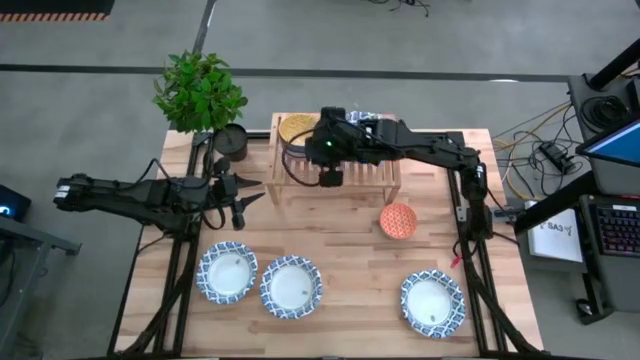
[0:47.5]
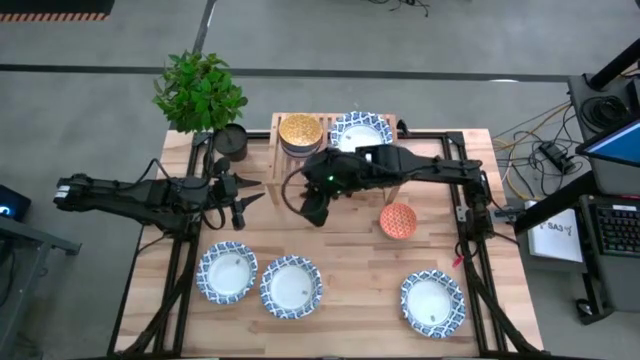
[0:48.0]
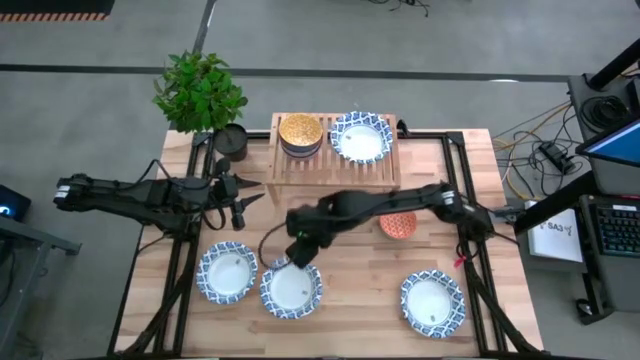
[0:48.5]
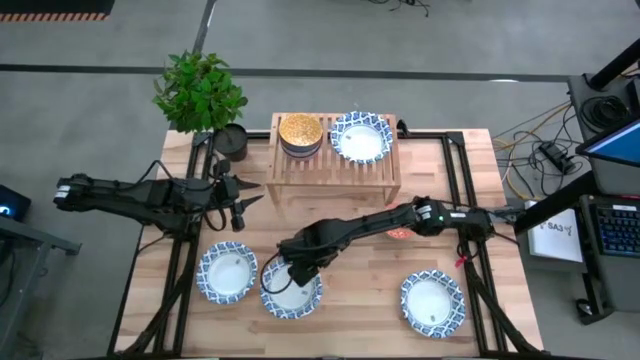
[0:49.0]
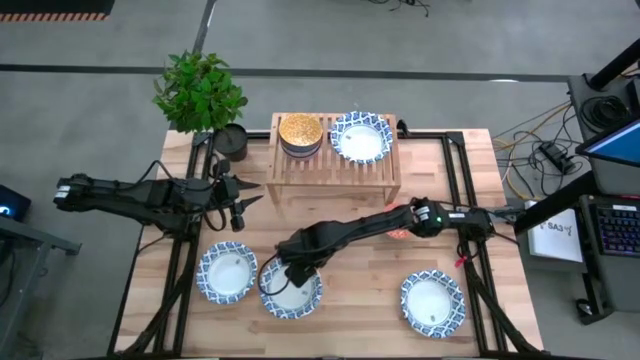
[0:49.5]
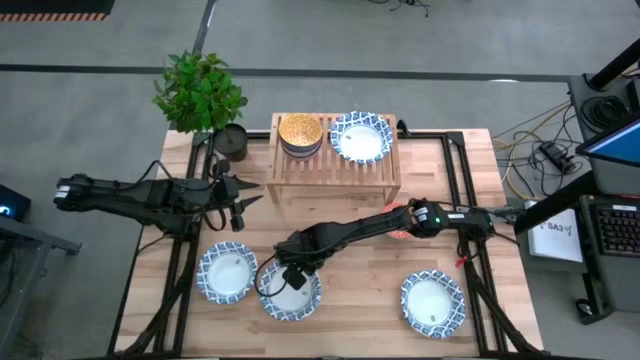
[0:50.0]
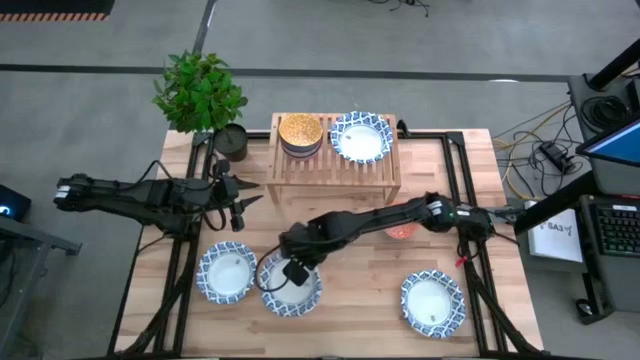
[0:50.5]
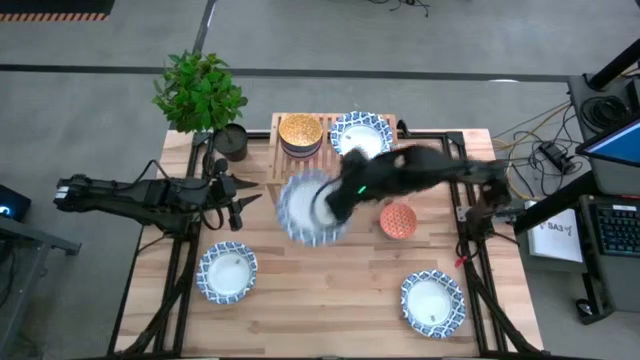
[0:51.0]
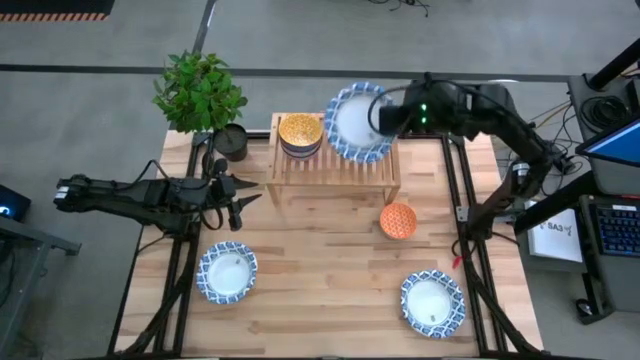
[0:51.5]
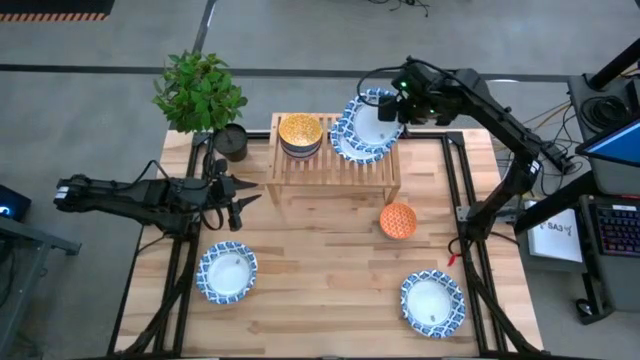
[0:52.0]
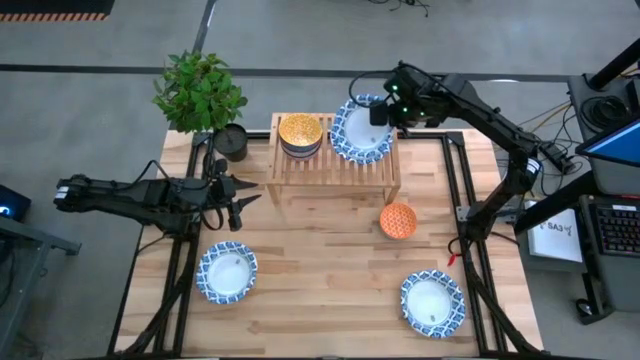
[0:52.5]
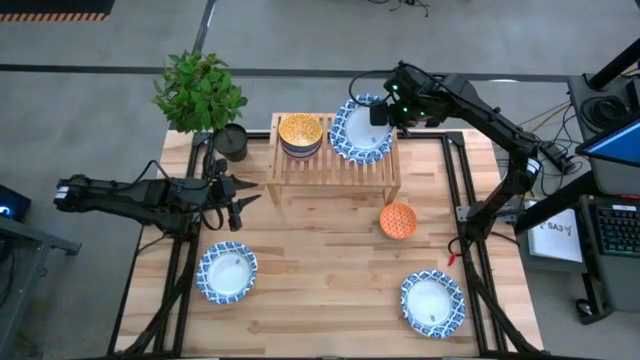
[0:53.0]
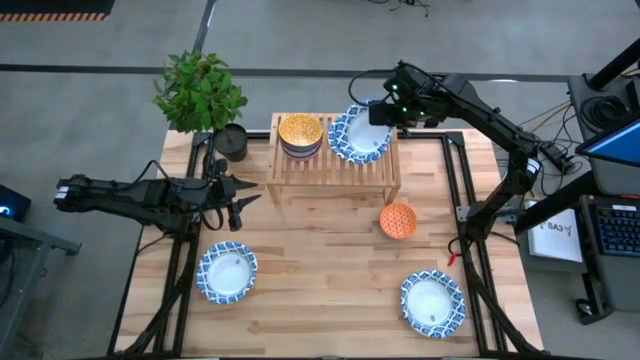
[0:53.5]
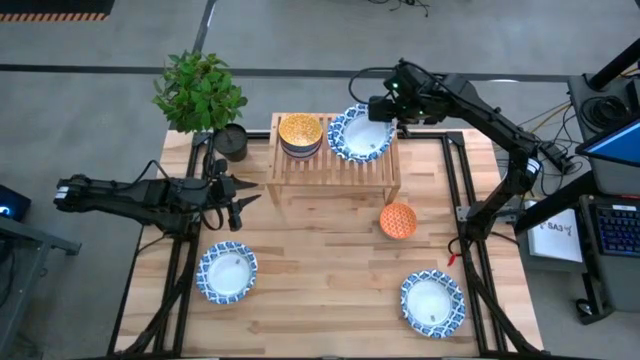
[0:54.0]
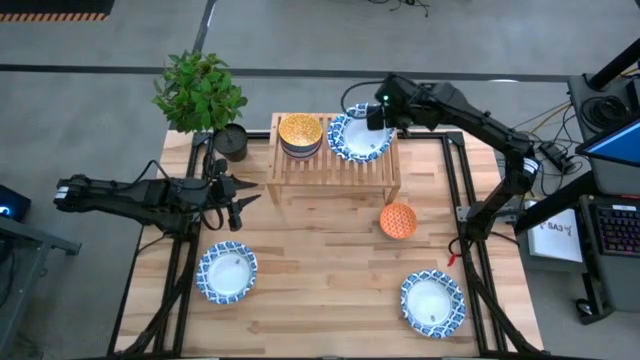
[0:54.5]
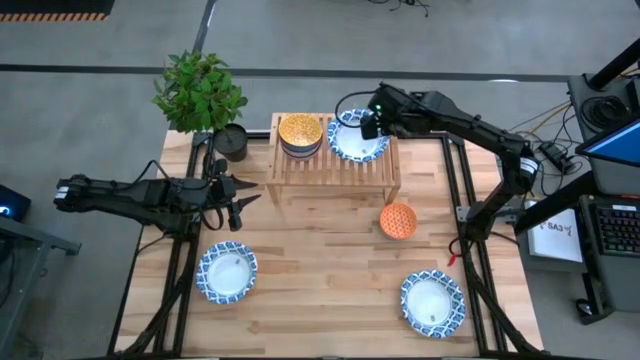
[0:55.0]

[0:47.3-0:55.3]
Task: Place and stack bowls onto a shelf
Stack the white patterned bowl on top of the other white patterned bowl on the shelf

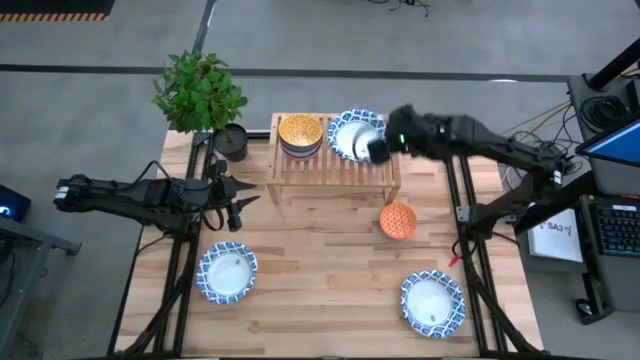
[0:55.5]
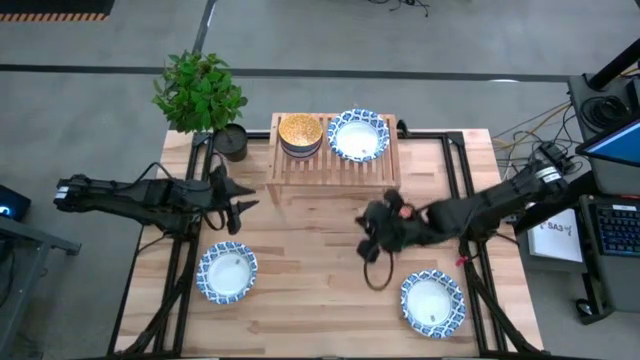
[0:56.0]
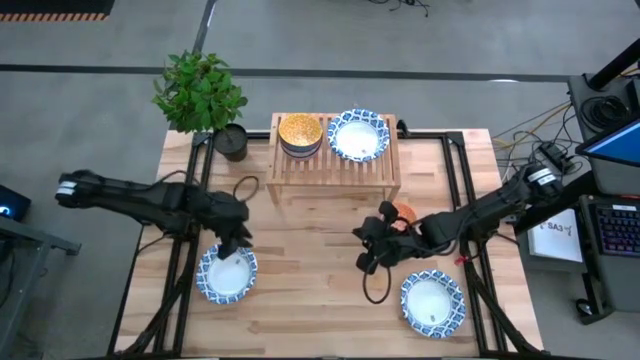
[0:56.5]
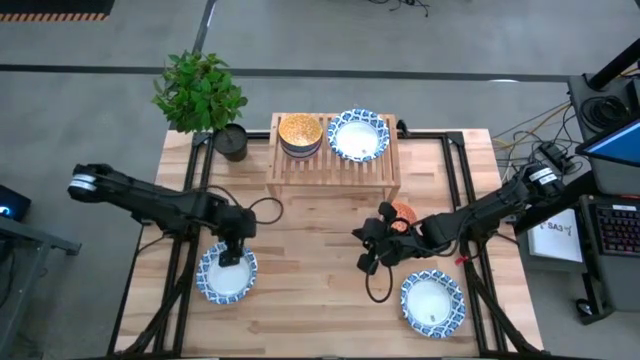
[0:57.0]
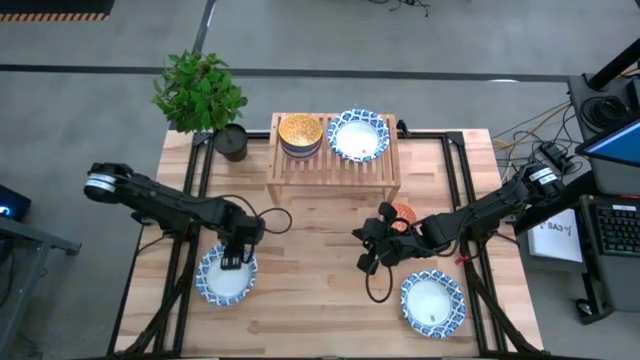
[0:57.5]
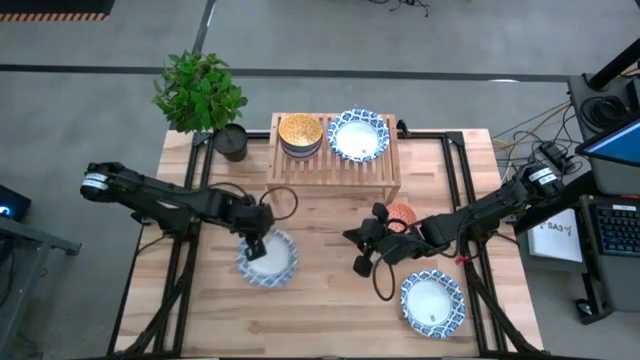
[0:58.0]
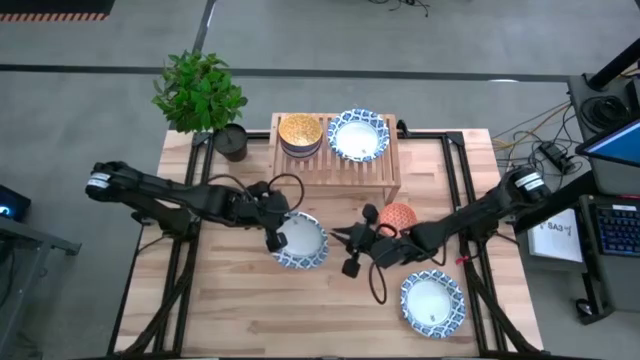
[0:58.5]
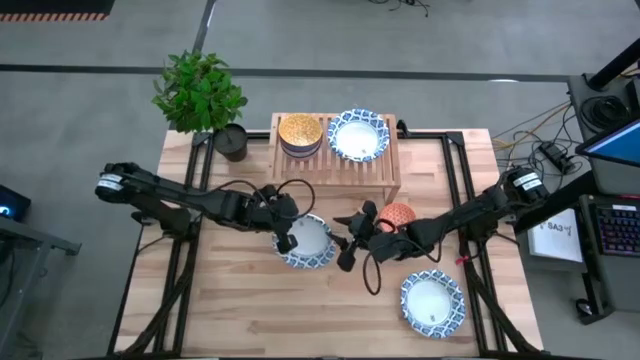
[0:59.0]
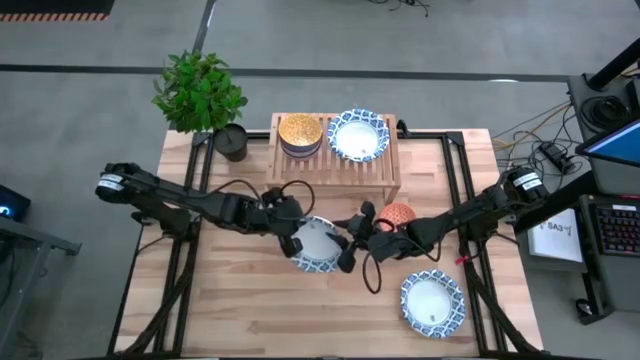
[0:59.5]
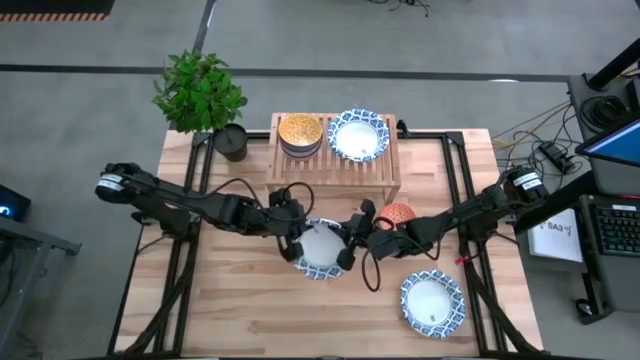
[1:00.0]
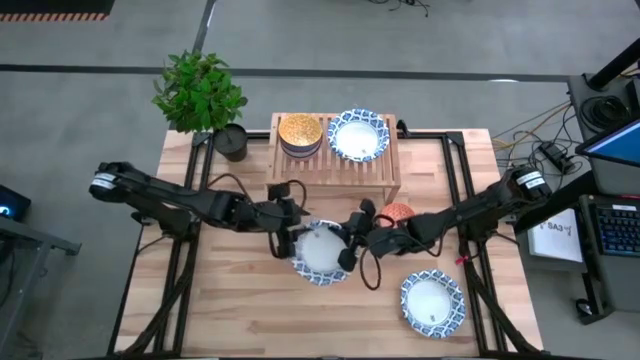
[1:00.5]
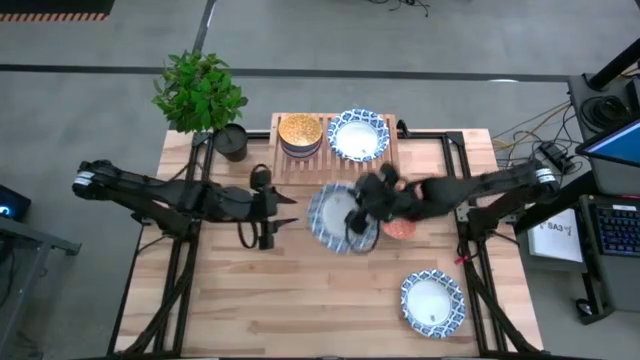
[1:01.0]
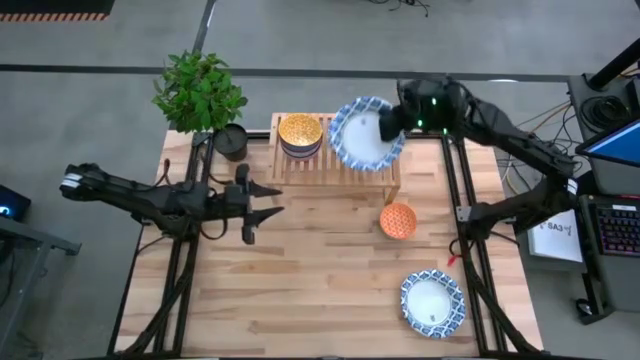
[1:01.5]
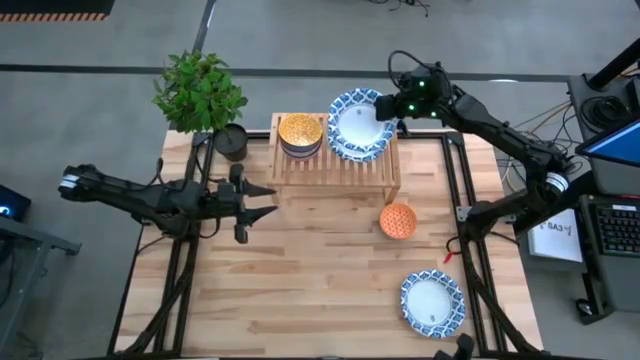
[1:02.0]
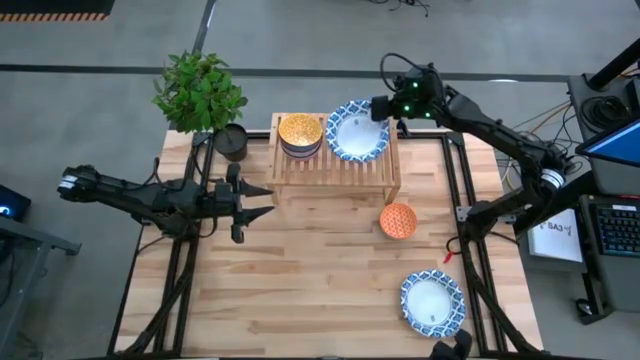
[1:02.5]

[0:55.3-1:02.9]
Stack the white patterned bowl on top of the other white patterned bowl on the shelf

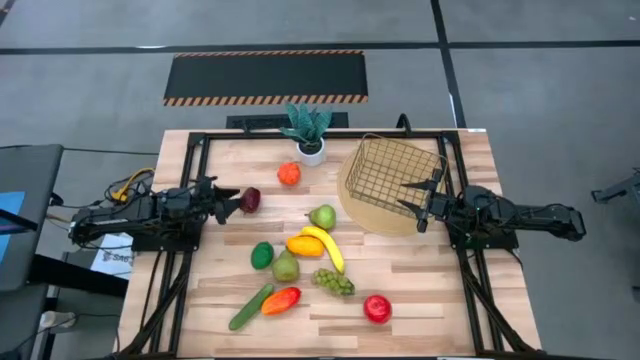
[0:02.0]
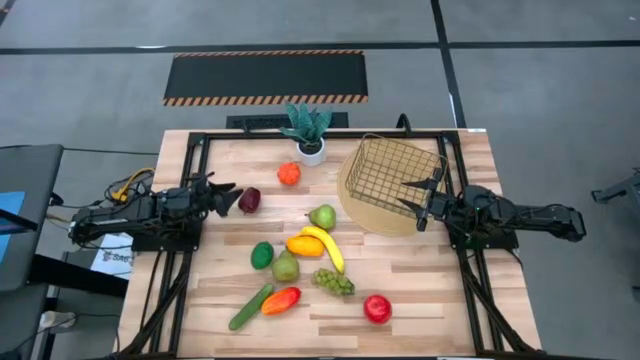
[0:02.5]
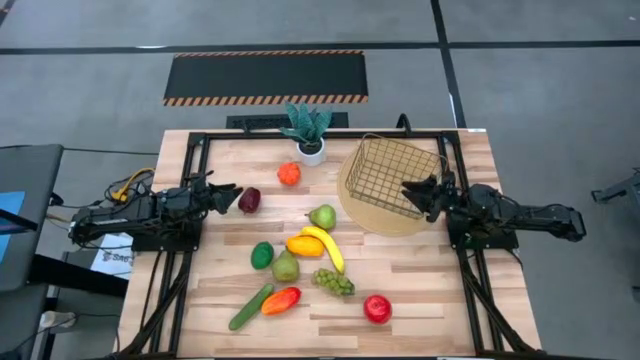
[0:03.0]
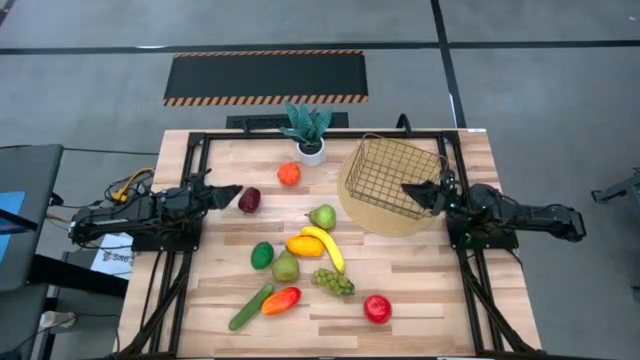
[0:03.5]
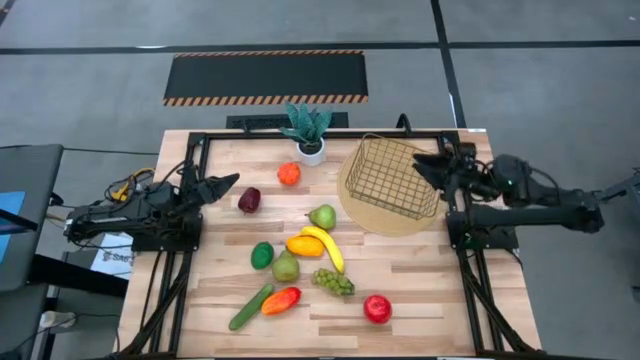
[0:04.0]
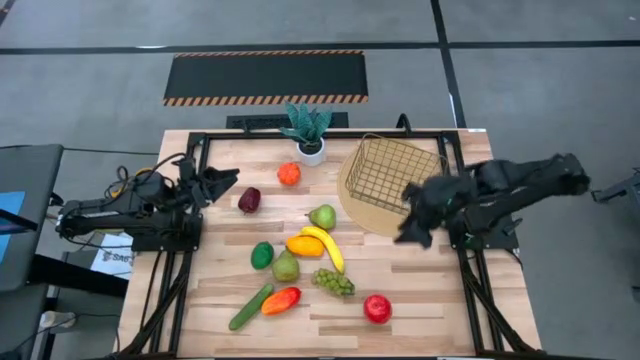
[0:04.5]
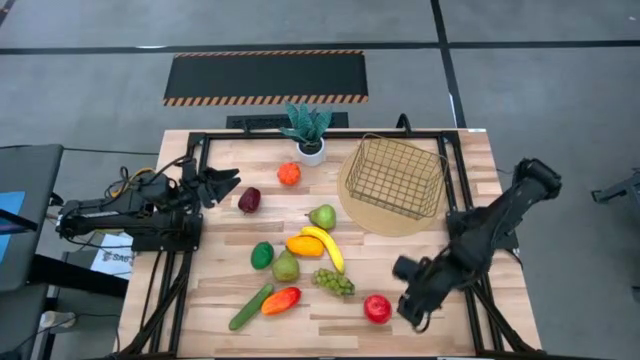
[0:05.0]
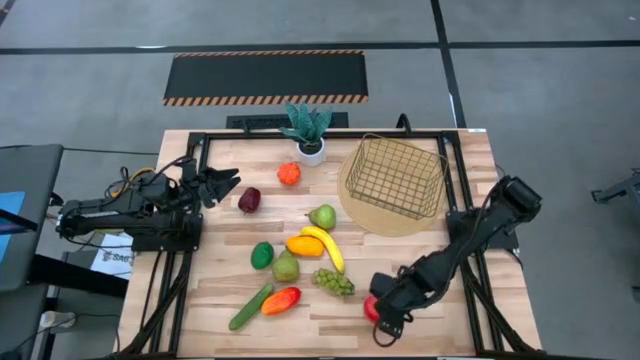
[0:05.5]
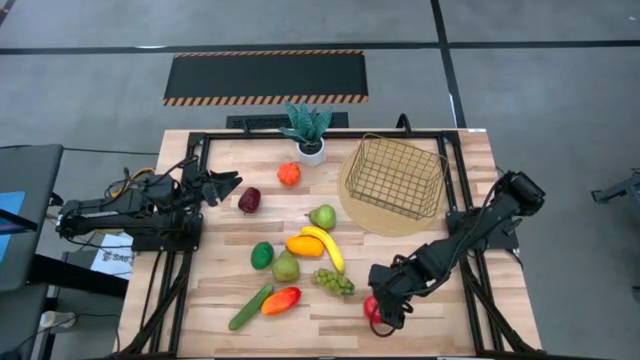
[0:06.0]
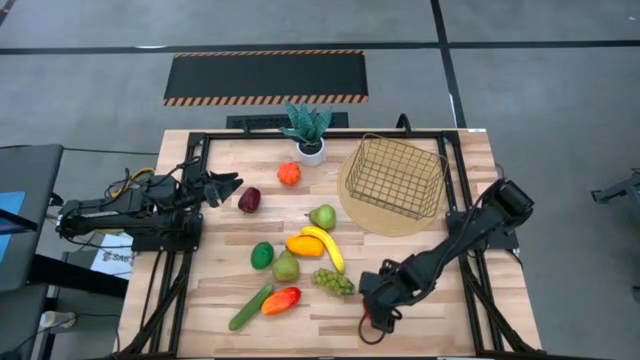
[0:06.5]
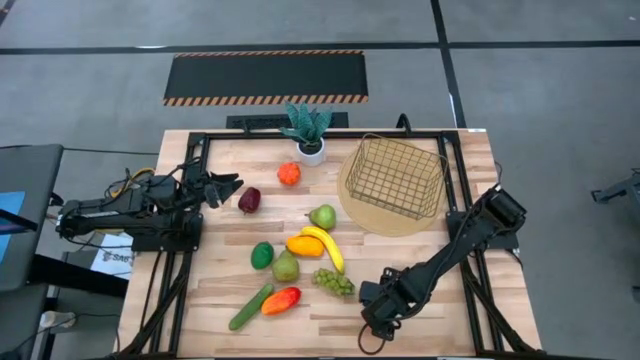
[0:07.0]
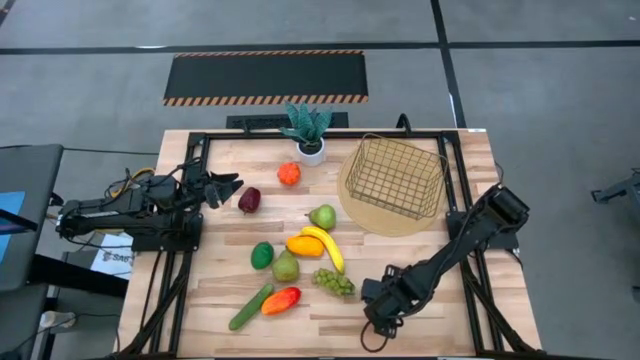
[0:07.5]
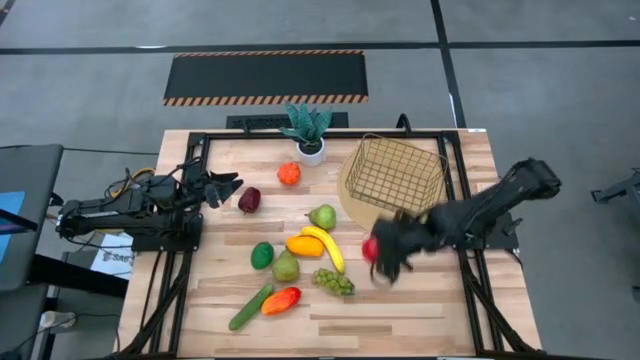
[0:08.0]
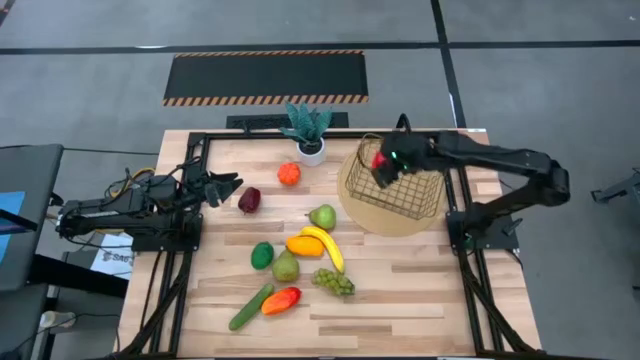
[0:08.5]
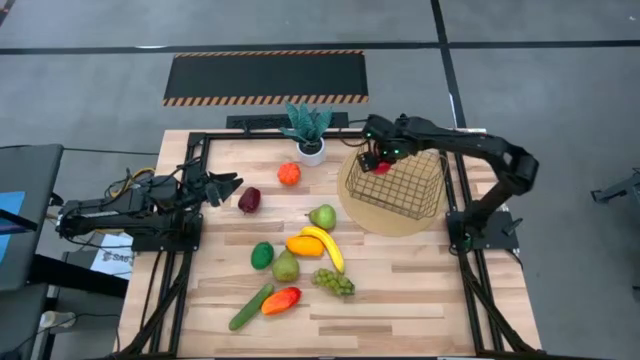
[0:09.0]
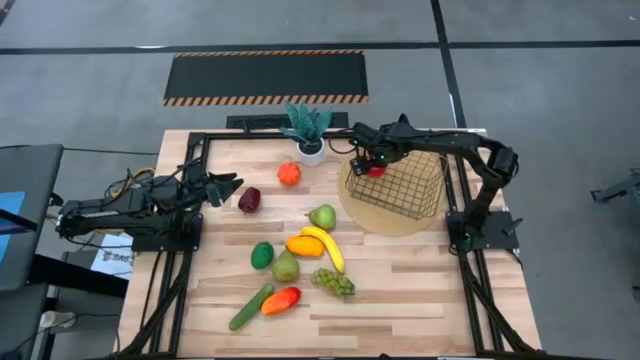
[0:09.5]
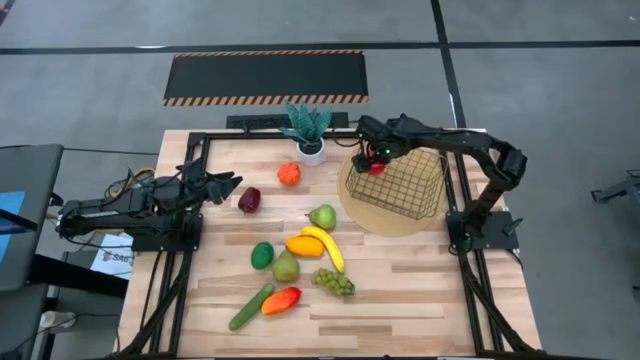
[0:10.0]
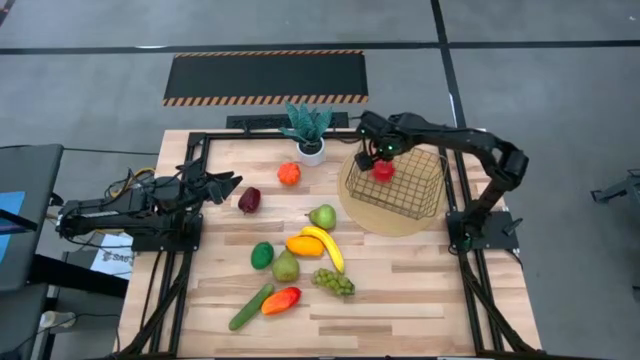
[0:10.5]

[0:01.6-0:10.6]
Task: Build produce basket
Put the red apple into the wire basket
